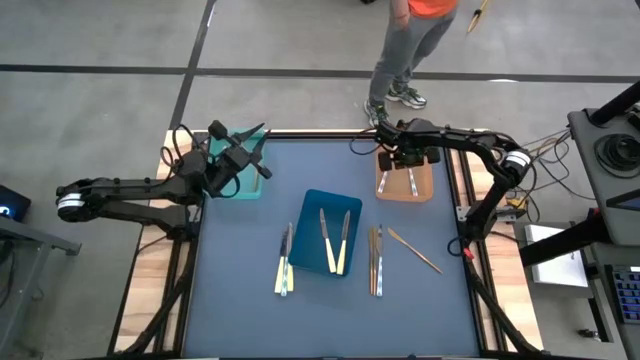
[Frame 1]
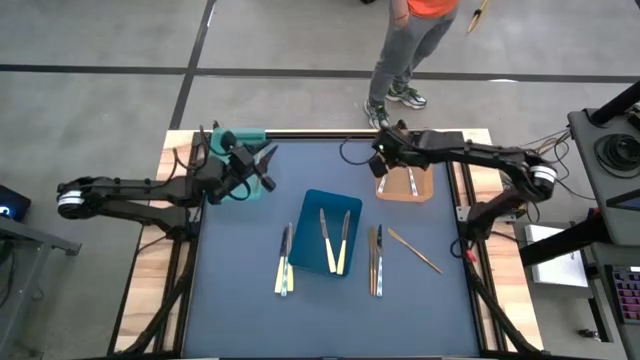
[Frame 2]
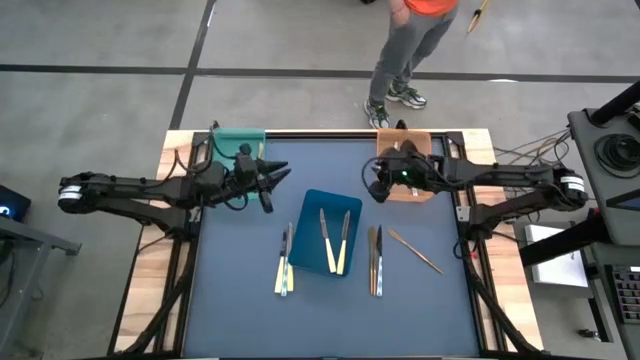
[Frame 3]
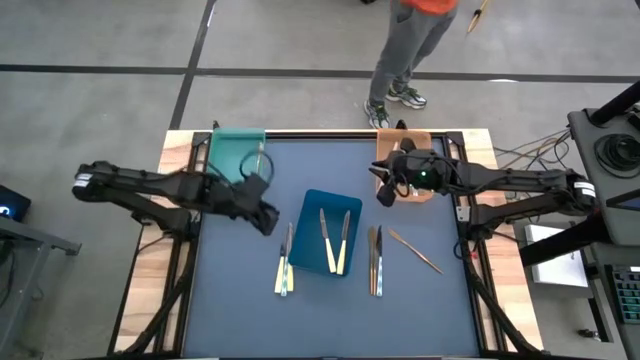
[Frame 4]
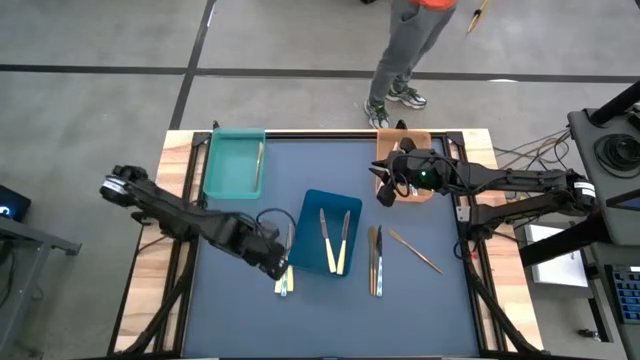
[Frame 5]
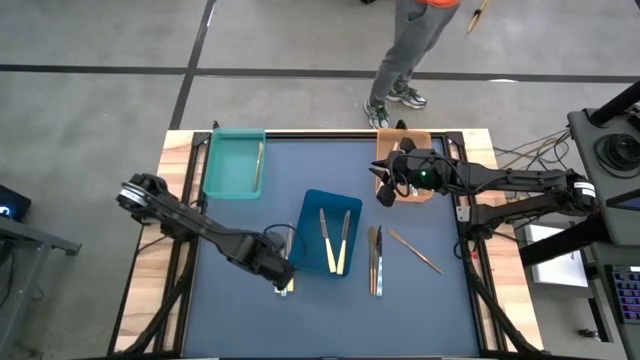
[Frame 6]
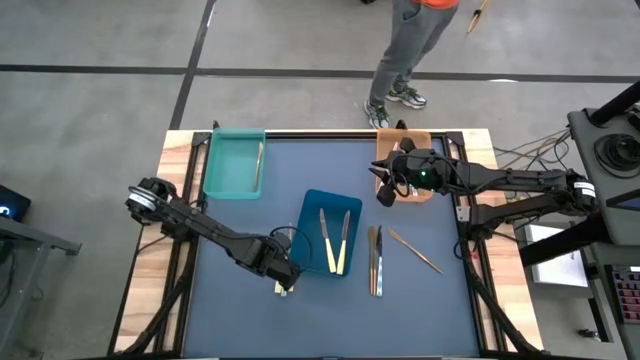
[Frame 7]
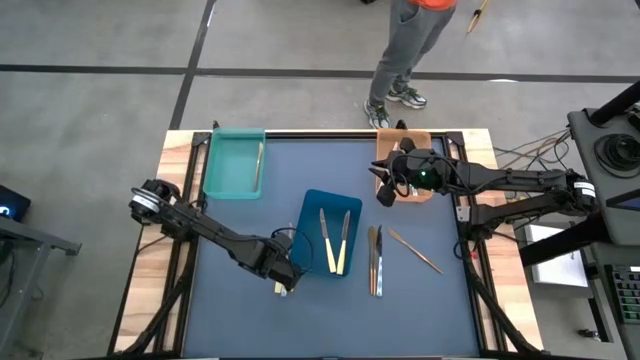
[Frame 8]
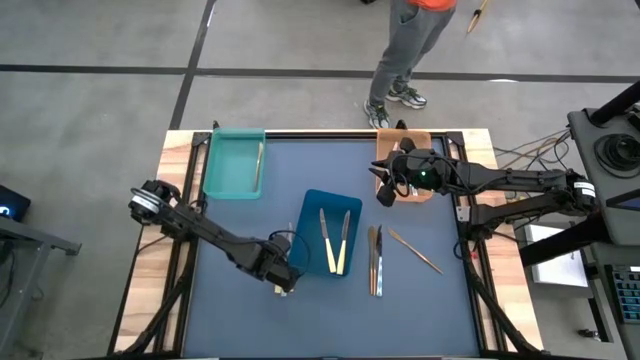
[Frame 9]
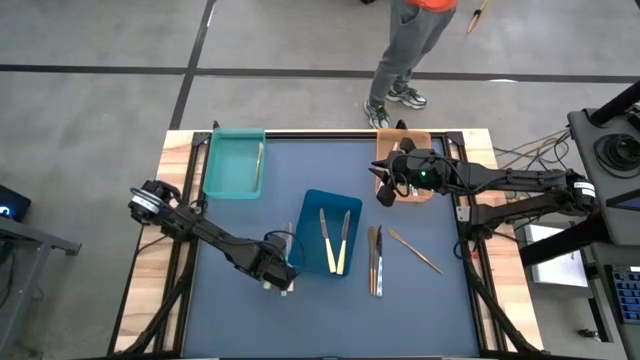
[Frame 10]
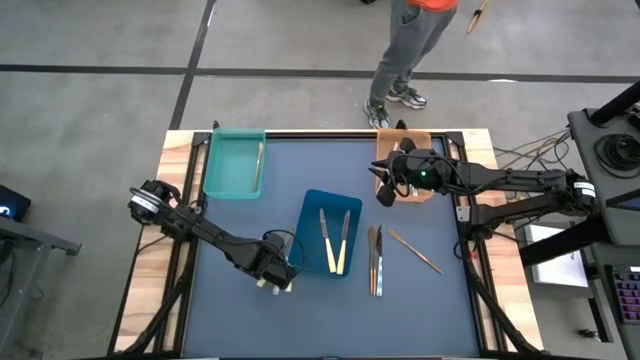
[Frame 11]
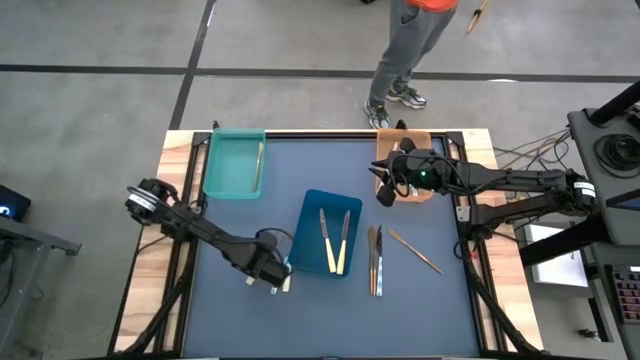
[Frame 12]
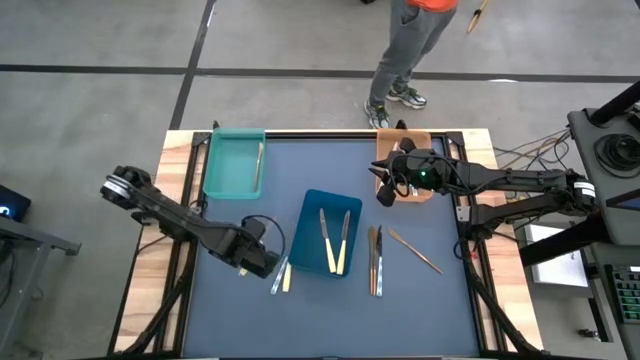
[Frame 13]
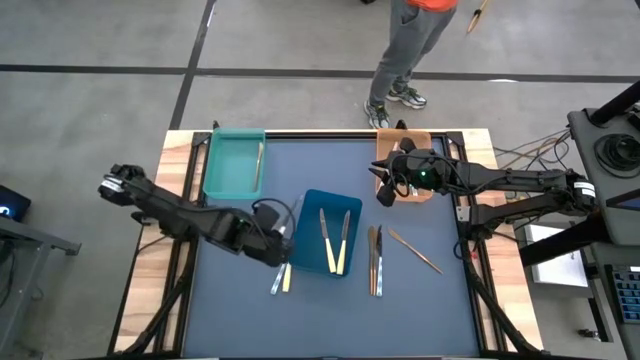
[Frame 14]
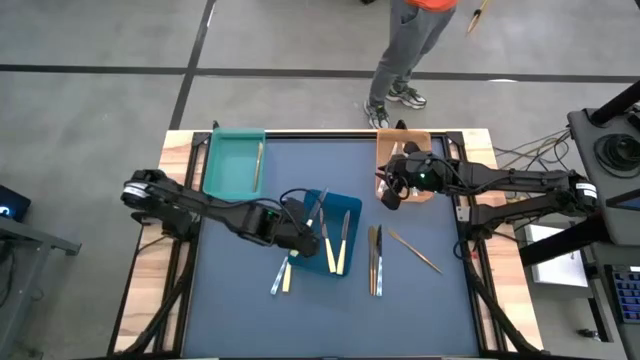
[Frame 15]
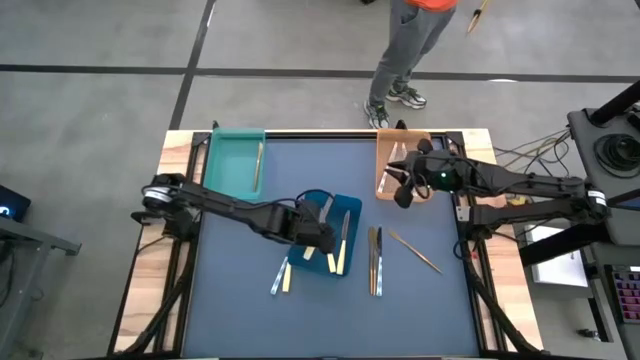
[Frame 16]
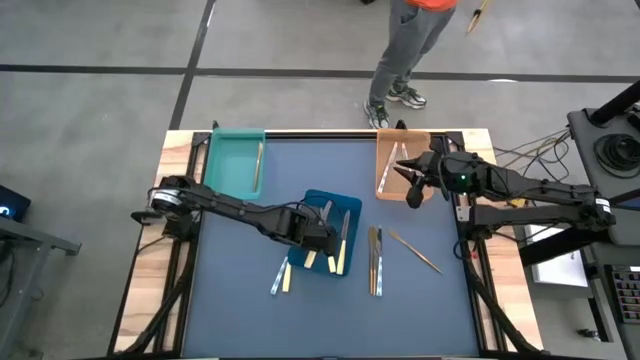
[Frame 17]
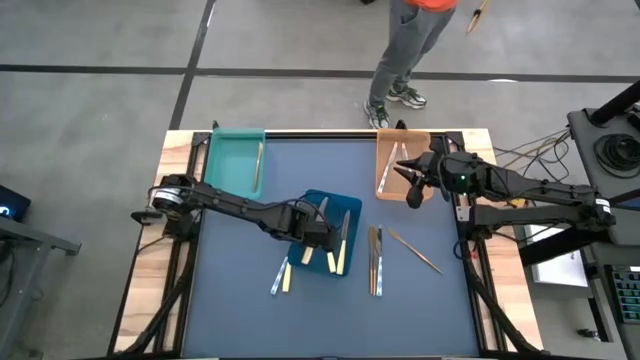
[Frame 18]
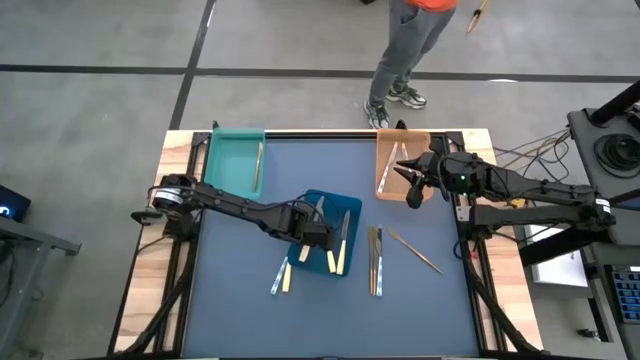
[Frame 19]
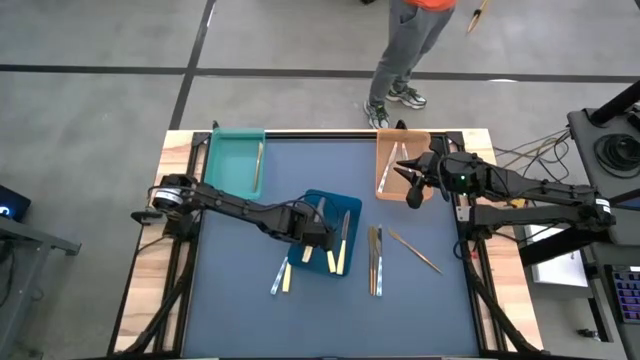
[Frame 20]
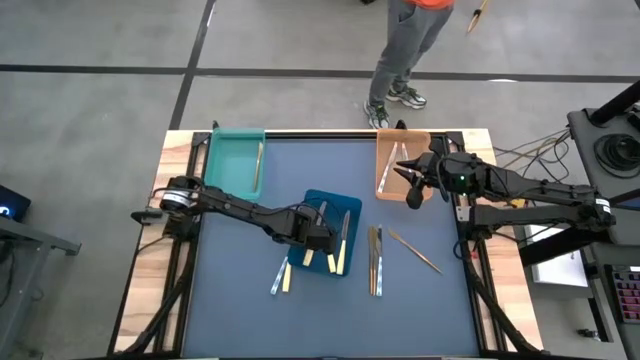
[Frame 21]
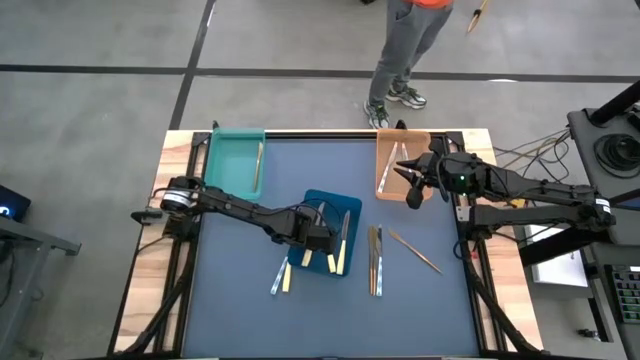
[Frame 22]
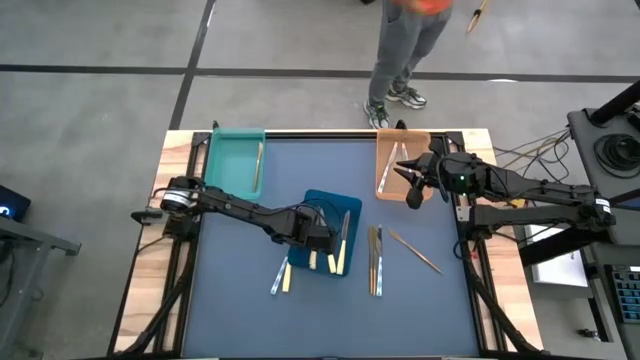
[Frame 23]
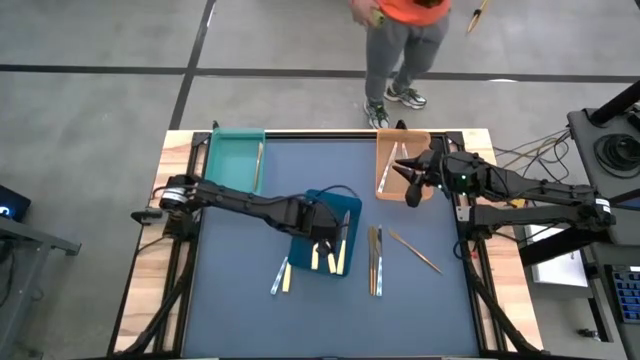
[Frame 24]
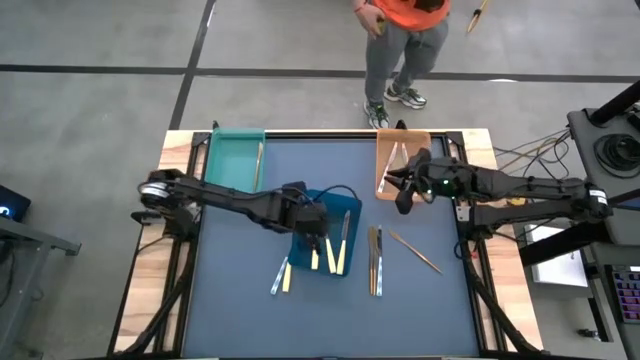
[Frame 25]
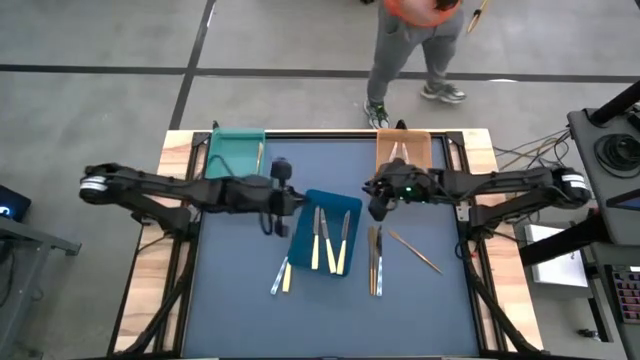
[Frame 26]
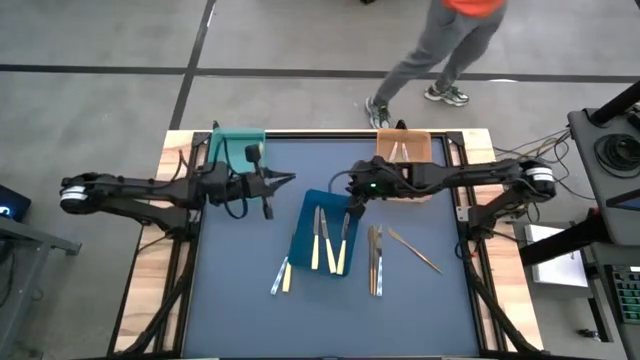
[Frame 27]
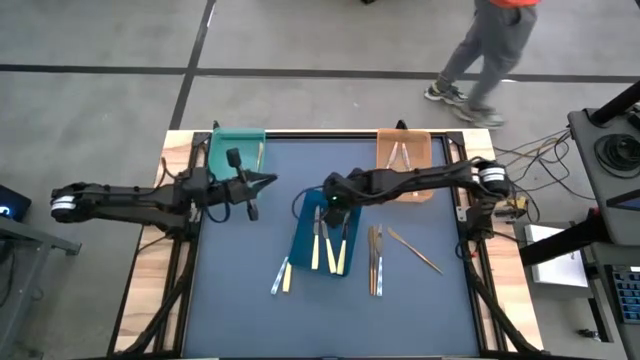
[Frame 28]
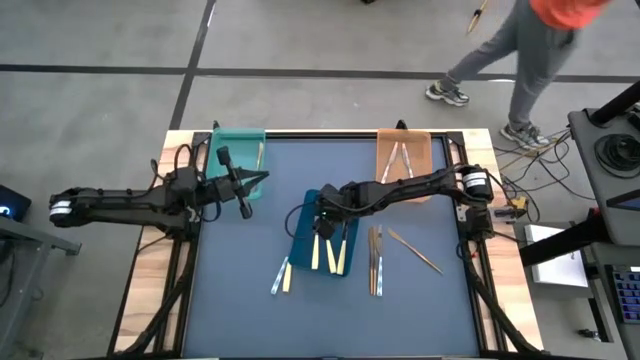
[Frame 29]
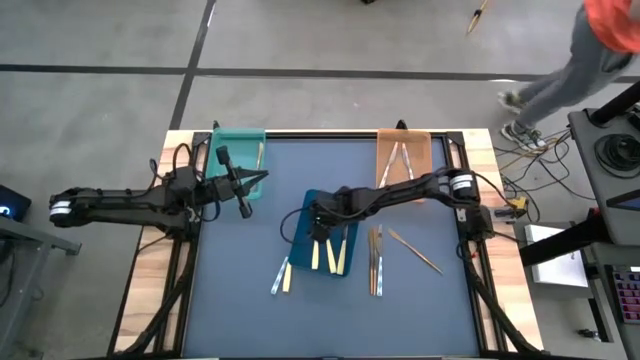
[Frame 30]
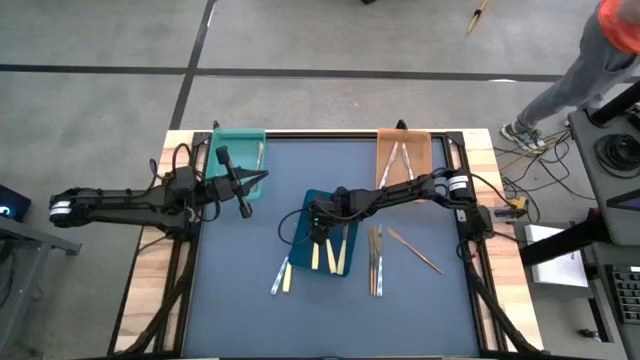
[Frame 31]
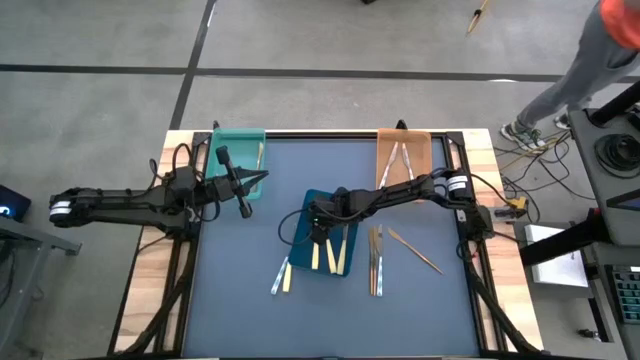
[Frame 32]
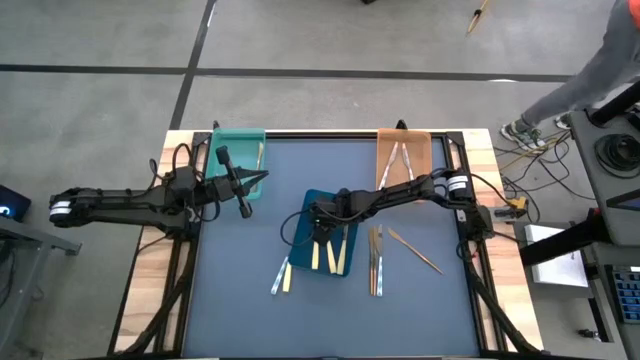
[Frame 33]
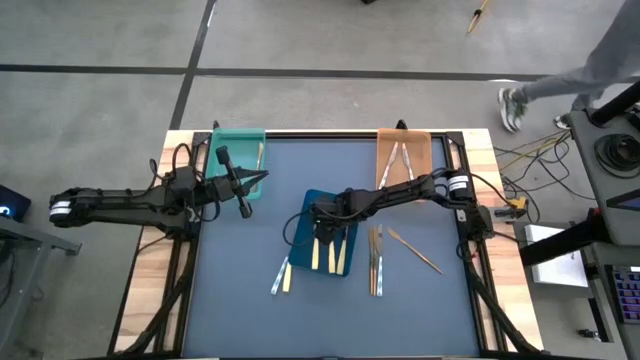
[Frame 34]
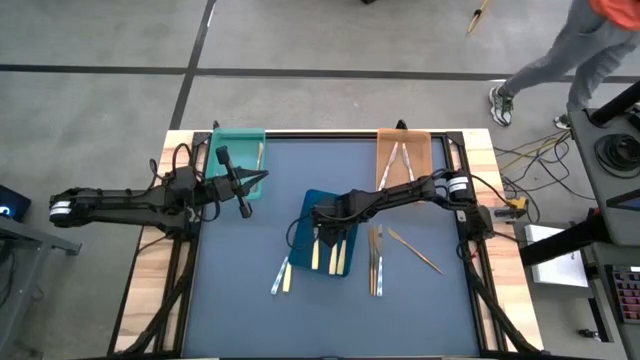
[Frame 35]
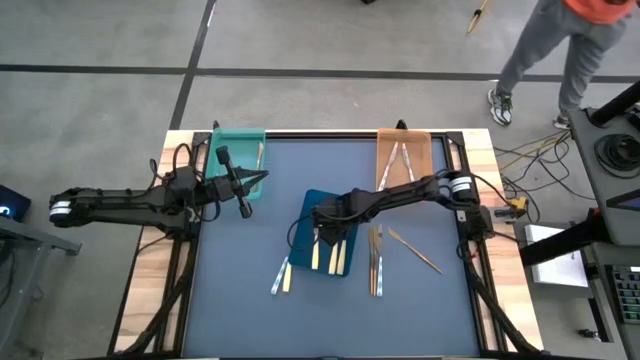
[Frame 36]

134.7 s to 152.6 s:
Task: Sort silverware by color (type)
Put the left yellow knife into the blue bin

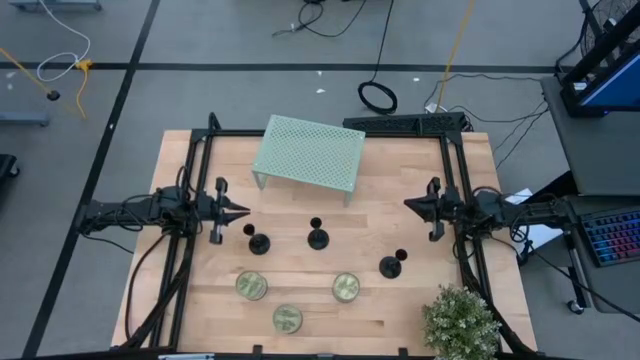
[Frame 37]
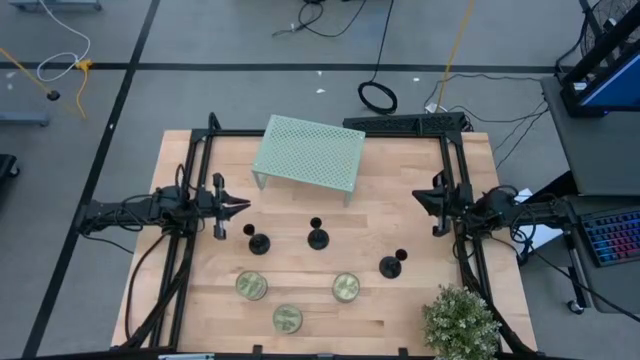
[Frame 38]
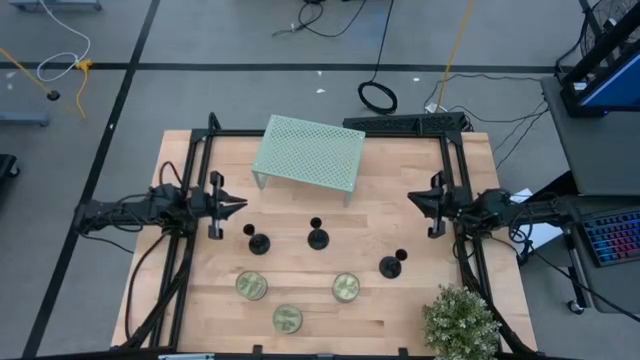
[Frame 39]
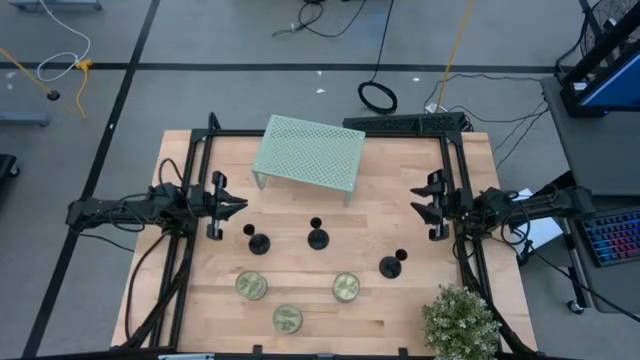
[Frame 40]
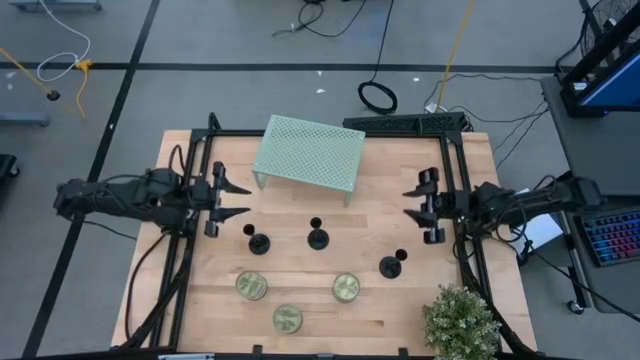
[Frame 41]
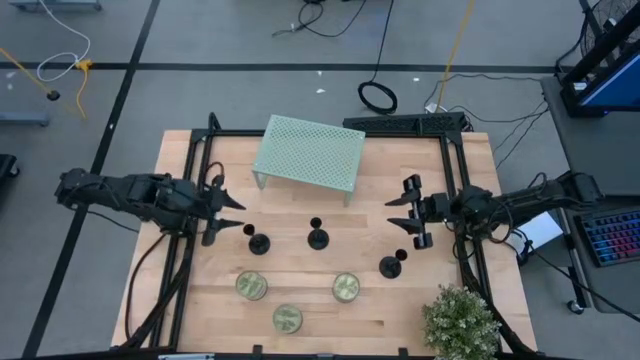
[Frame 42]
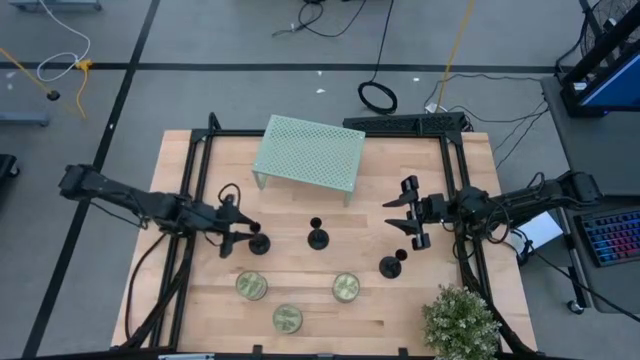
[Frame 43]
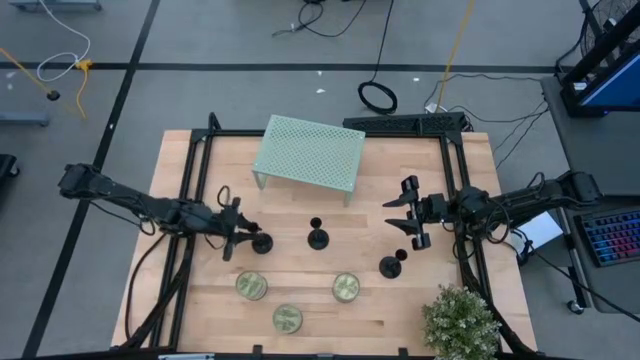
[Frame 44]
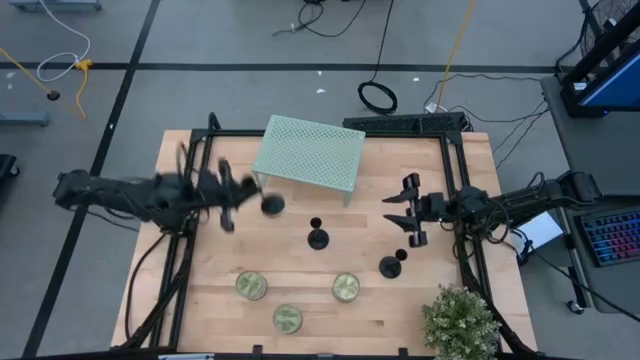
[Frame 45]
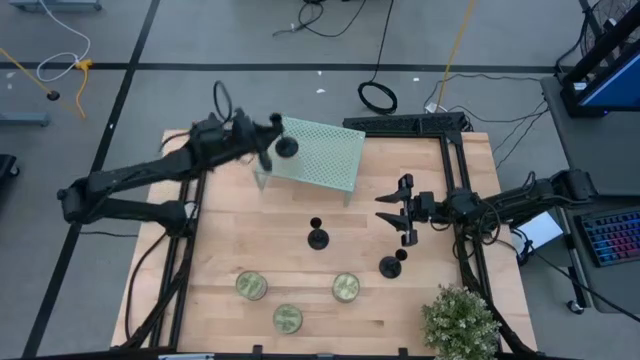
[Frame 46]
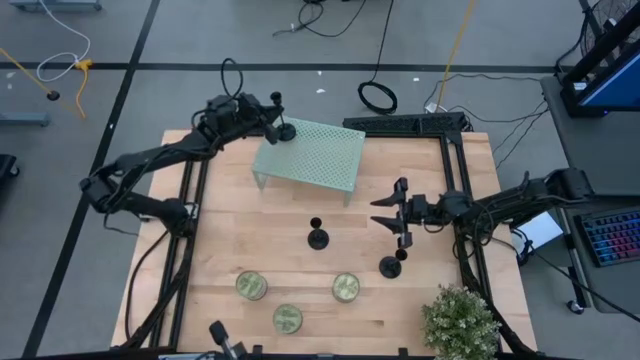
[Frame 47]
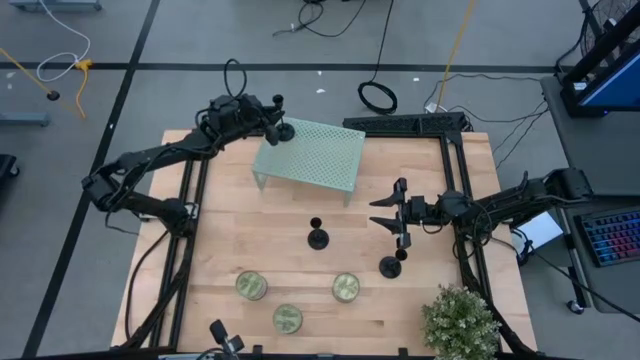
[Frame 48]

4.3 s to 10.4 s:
Task: Pick & Place candle stick holders
Put the top left black candle holder on the shelf
